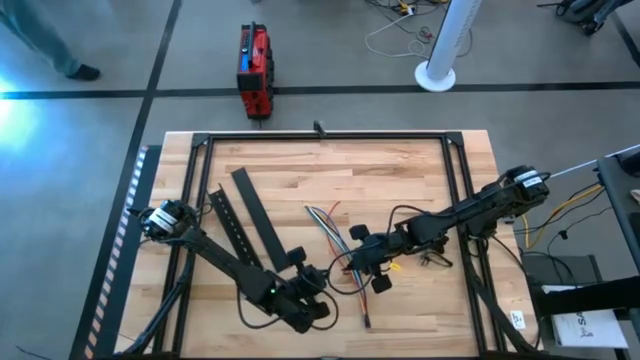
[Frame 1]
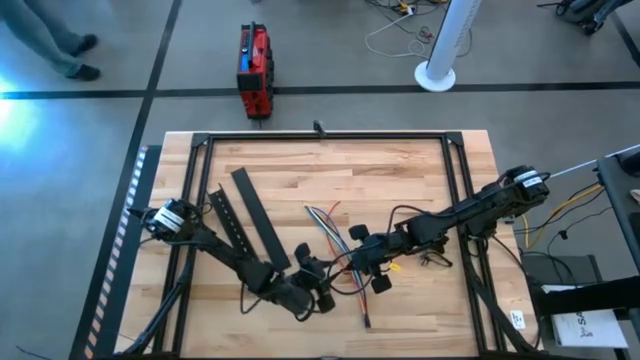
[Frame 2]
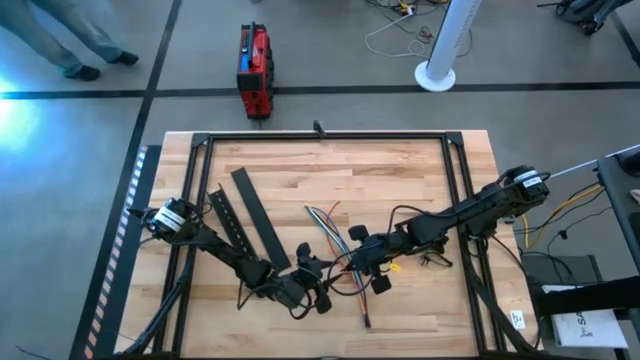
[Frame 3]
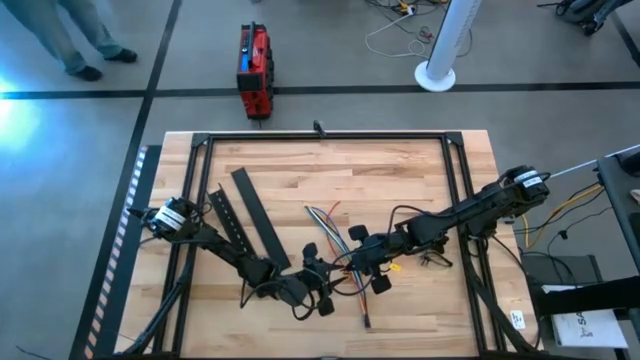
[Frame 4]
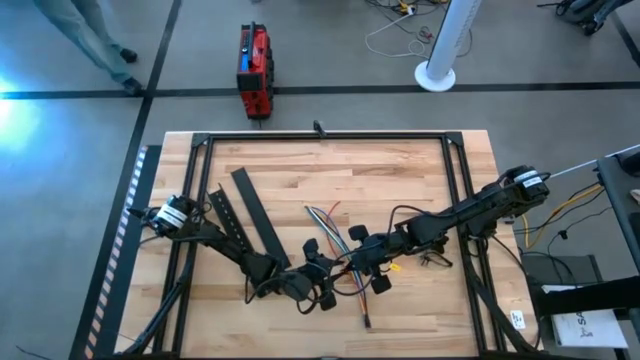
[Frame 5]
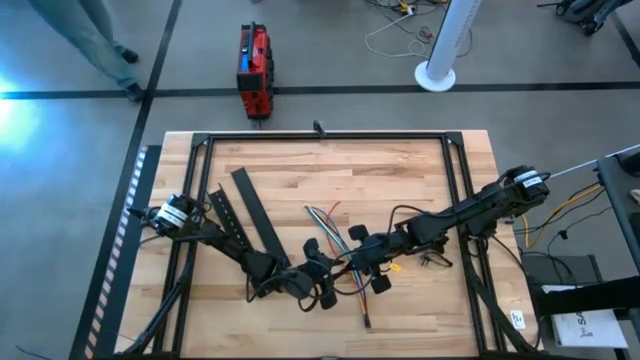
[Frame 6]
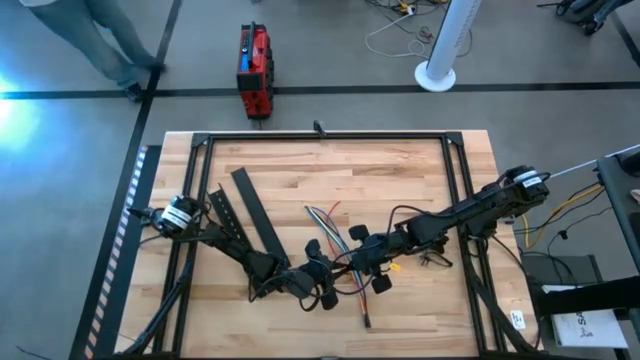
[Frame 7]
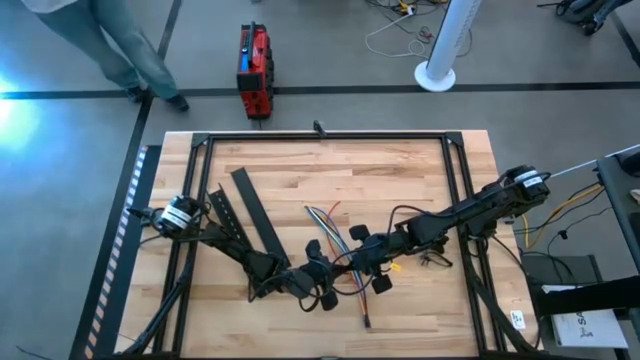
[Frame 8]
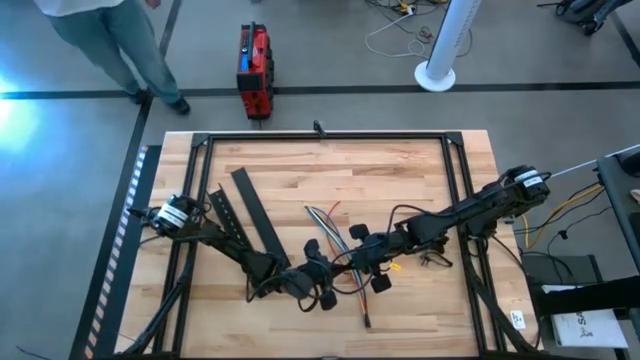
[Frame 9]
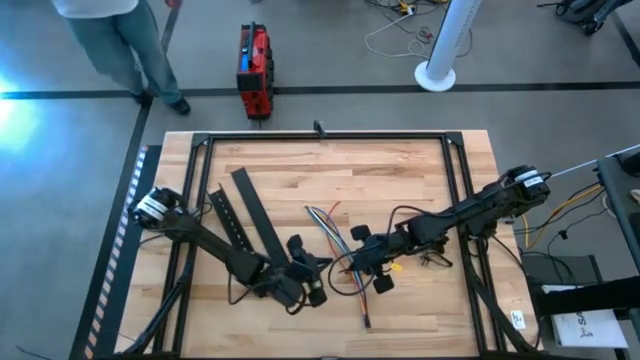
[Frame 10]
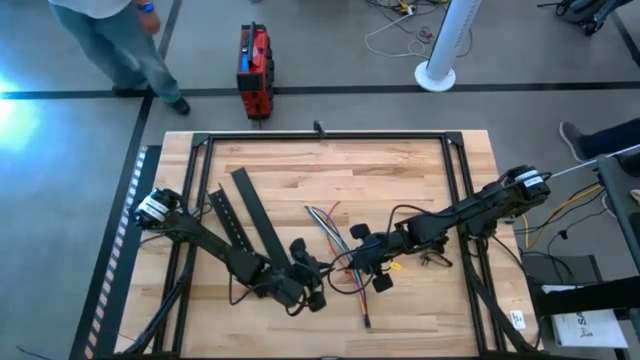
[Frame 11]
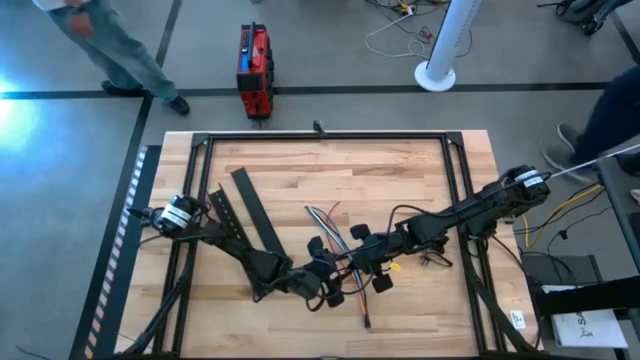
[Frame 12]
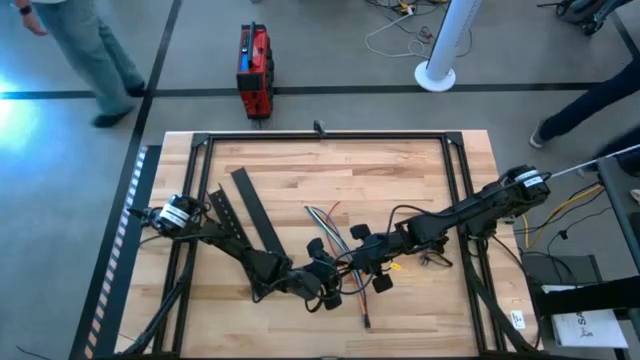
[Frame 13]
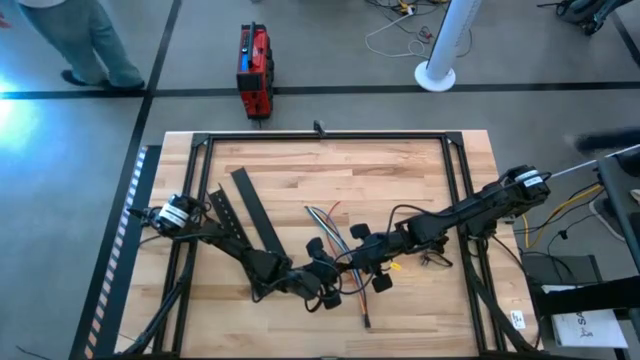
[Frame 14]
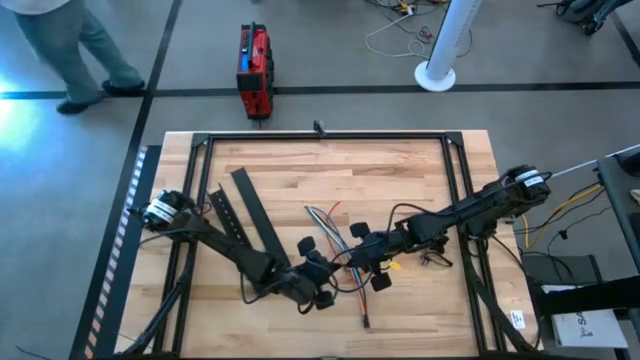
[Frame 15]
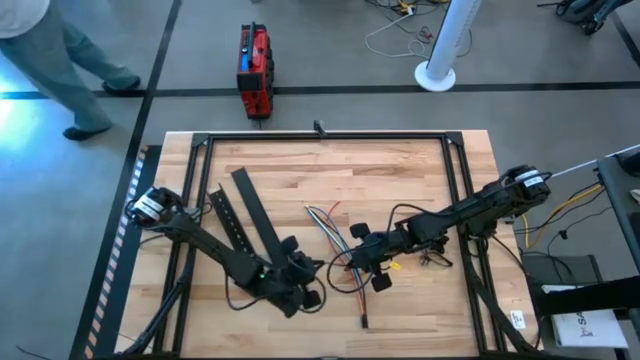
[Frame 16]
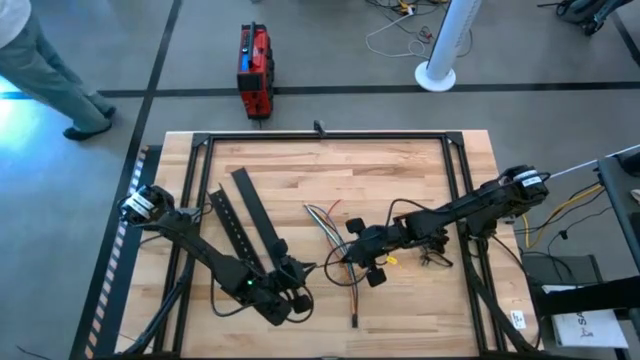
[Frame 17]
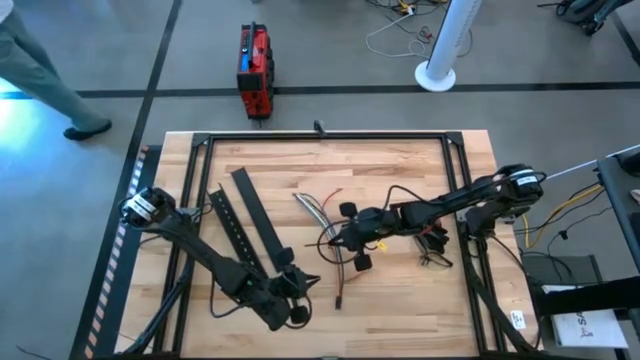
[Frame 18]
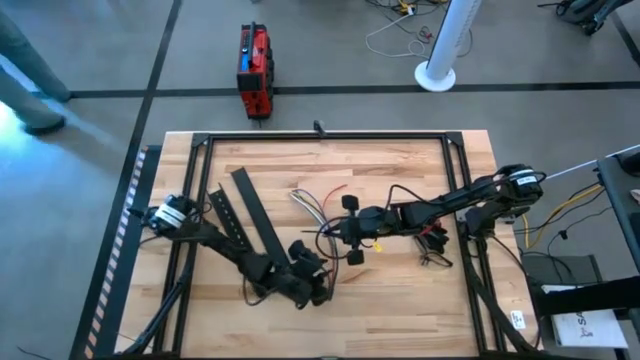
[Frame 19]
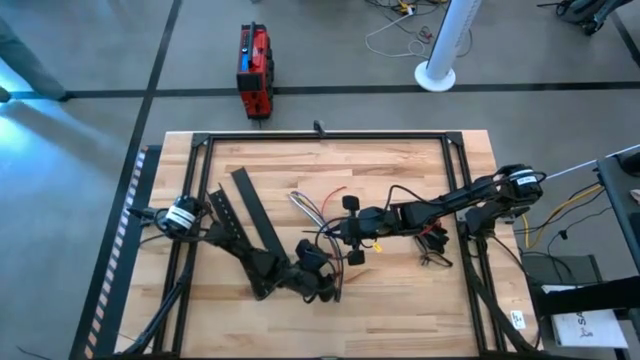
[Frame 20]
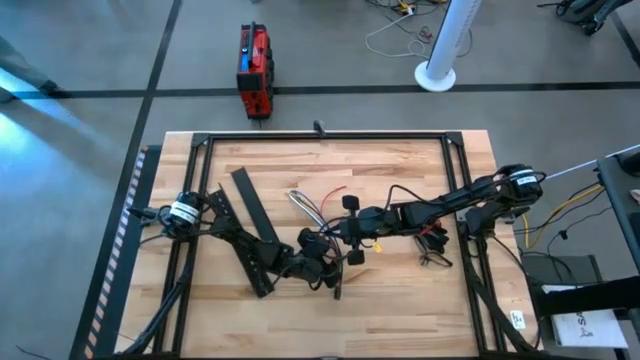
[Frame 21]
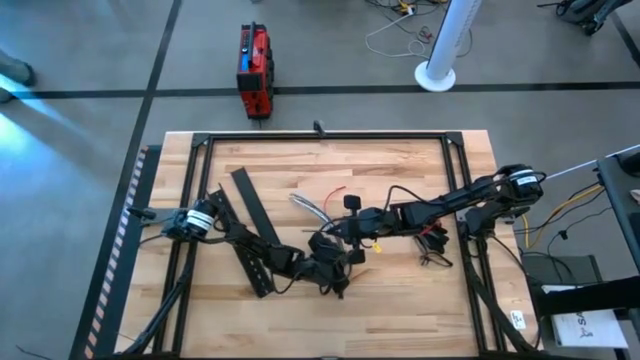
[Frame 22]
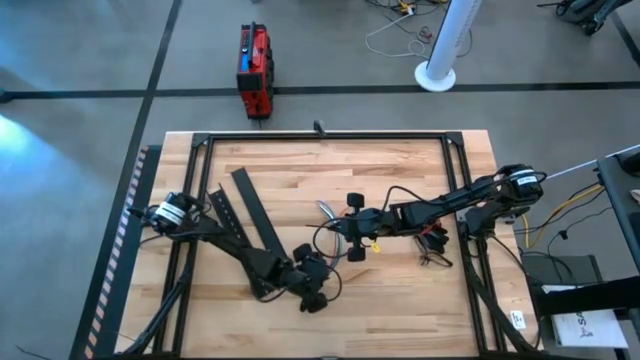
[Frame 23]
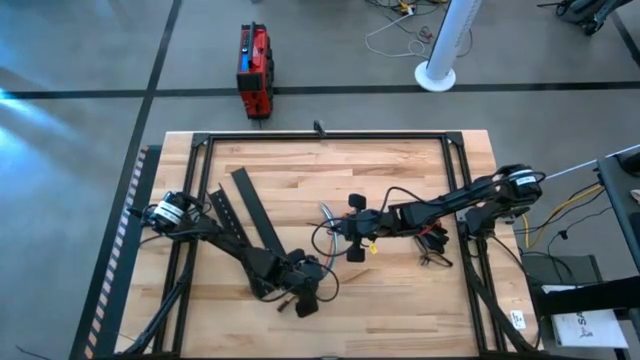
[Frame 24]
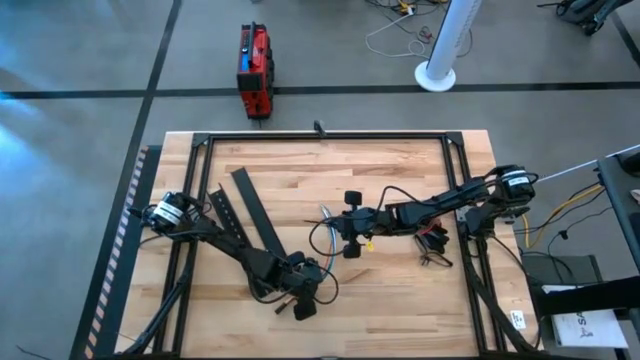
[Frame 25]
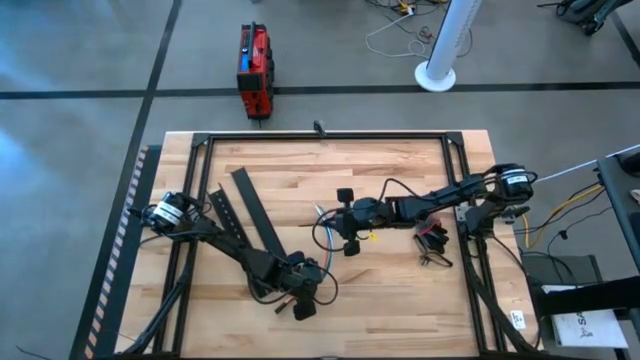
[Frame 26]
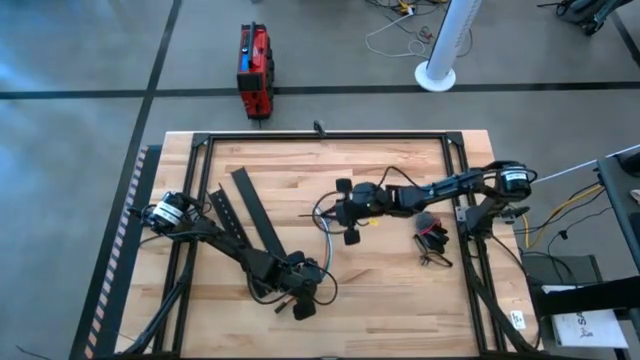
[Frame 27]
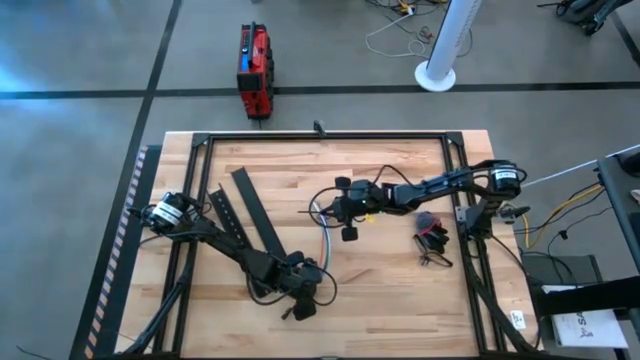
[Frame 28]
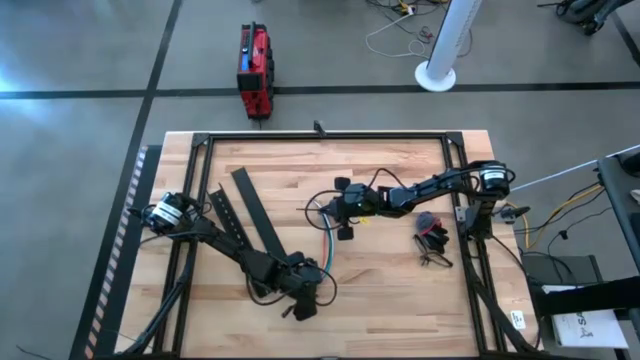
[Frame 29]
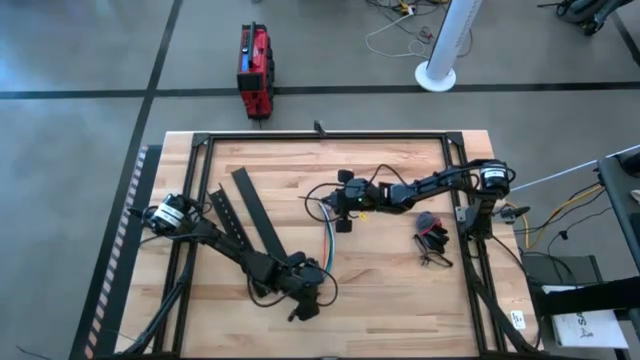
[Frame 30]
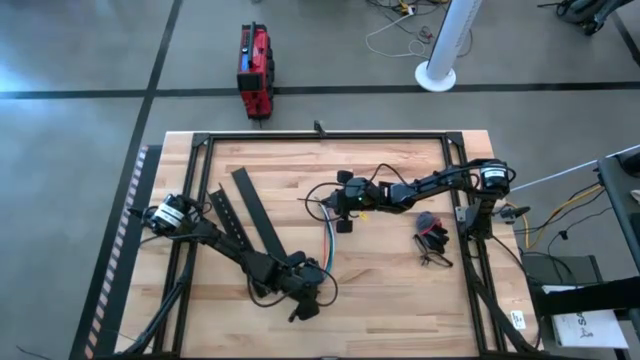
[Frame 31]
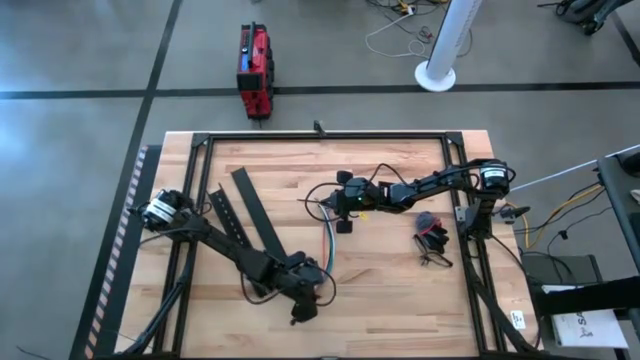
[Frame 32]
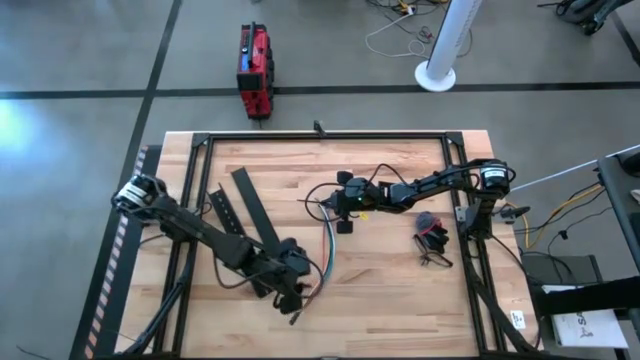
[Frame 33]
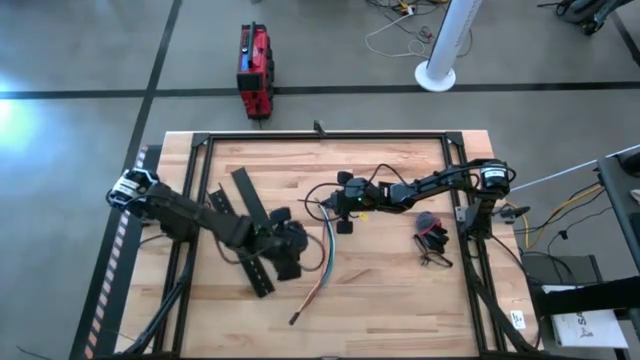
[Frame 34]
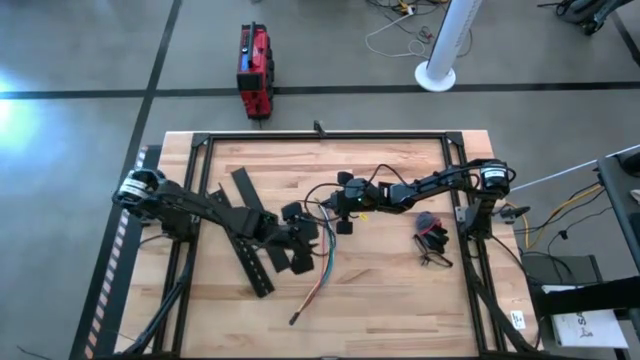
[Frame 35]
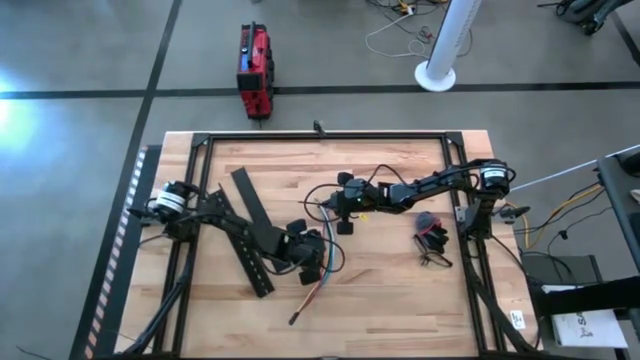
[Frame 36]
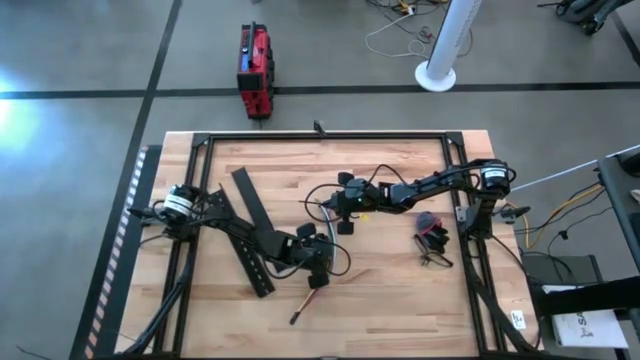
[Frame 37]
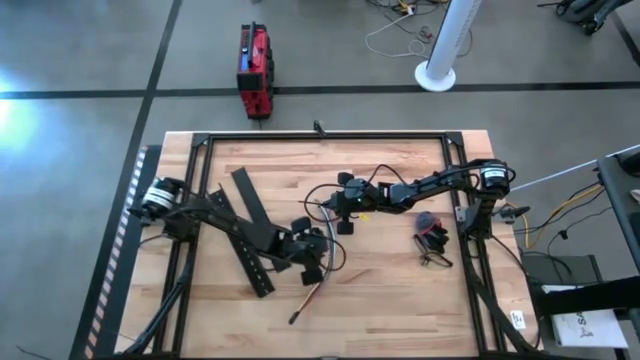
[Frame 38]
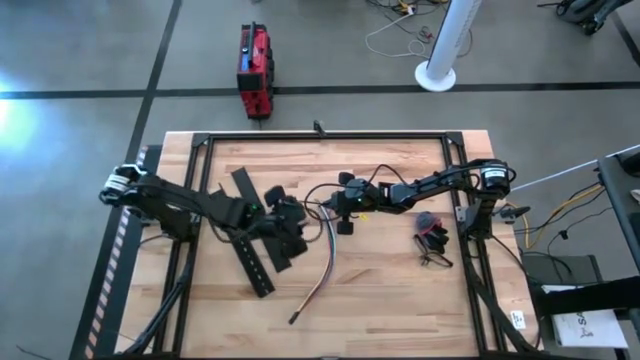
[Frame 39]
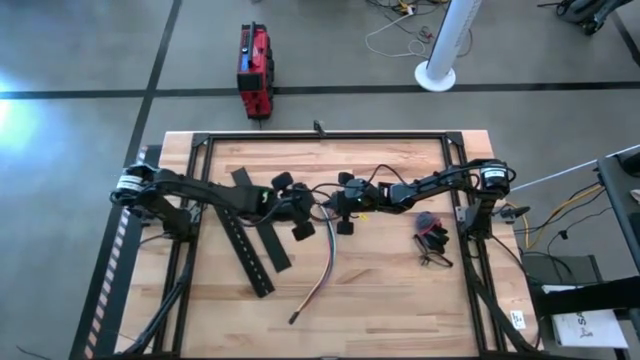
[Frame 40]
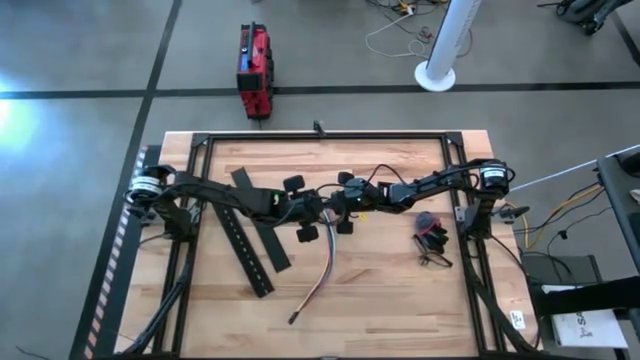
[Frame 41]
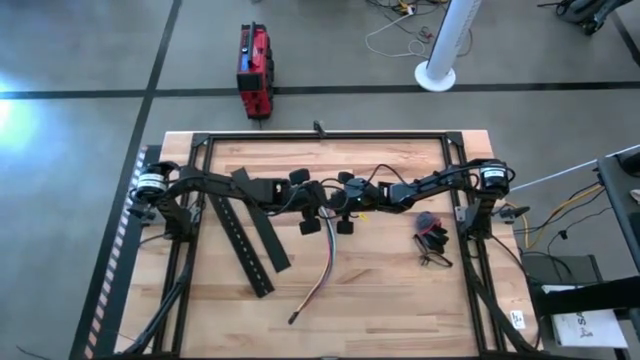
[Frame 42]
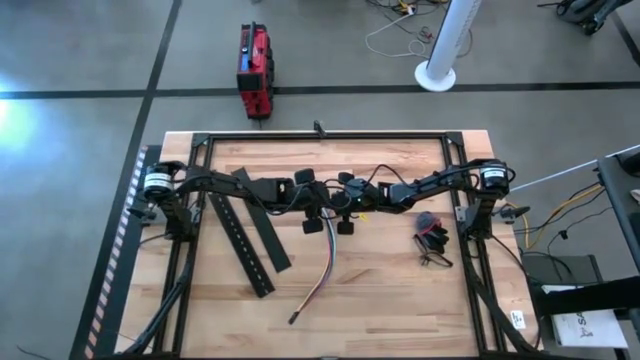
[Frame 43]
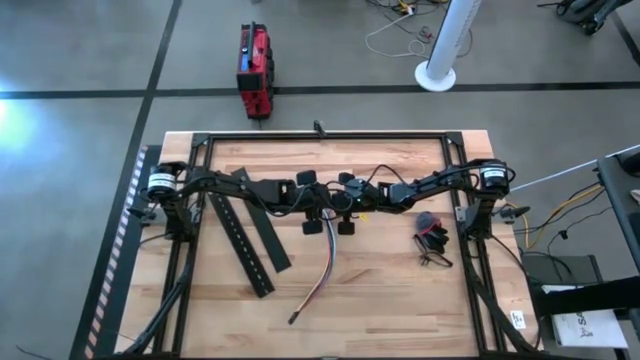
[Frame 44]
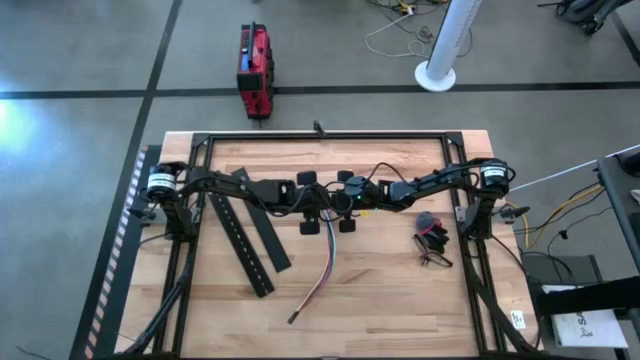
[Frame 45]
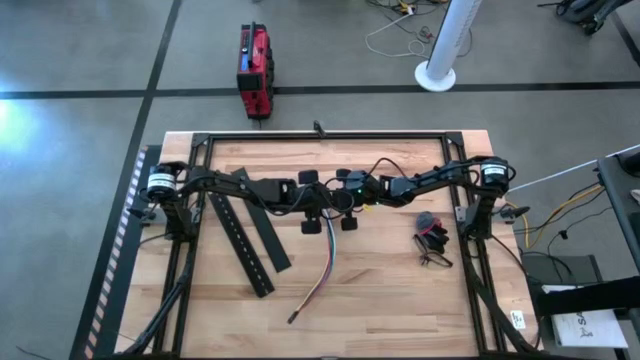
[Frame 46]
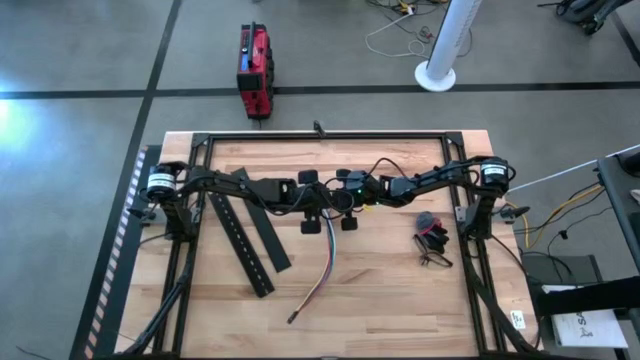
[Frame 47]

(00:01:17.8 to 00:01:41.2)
Task: Ziptie cables
Wrap the cable wires with the black zip tie
